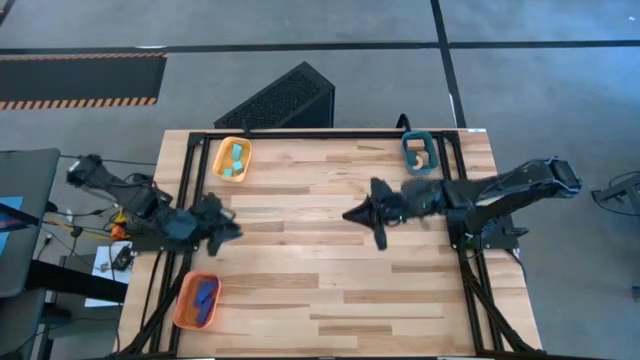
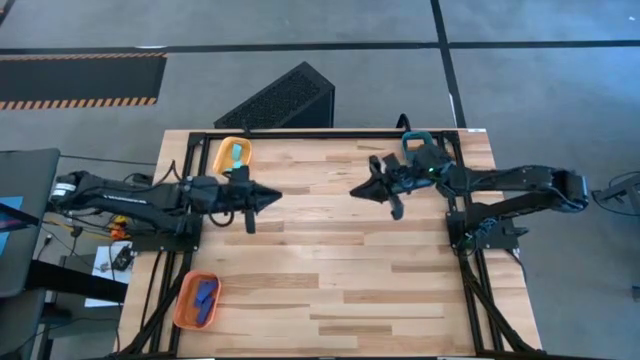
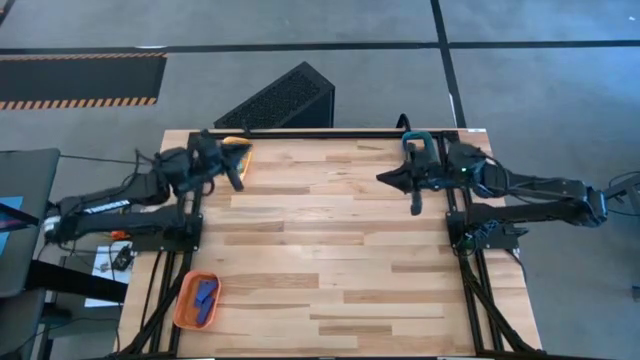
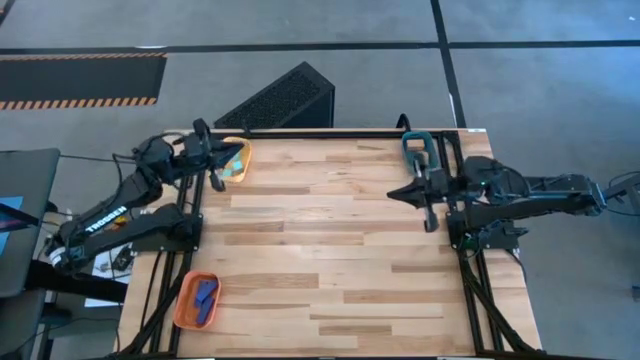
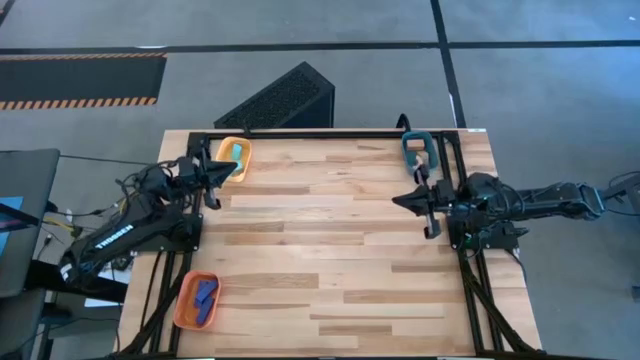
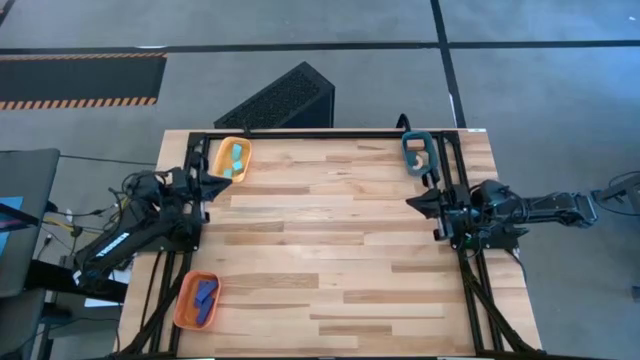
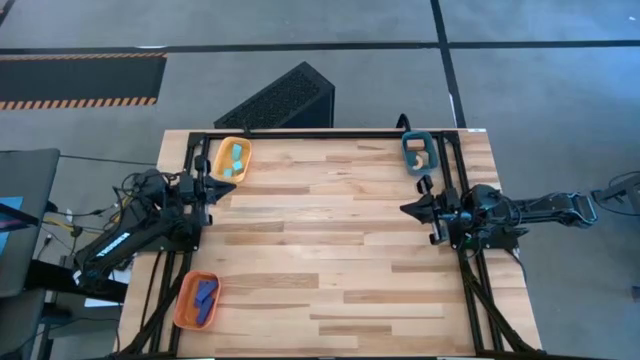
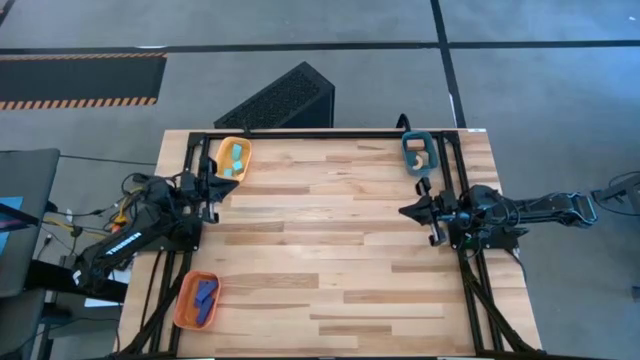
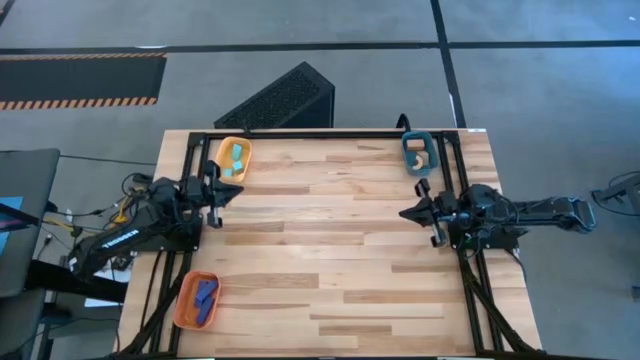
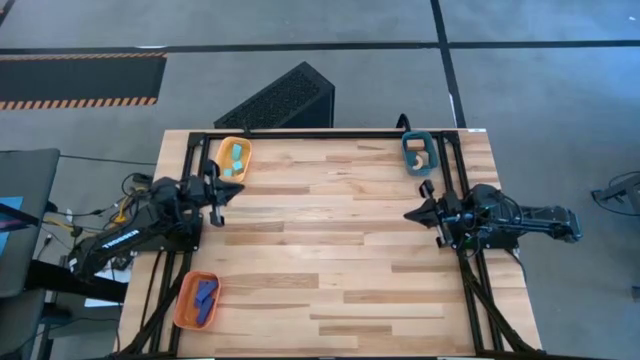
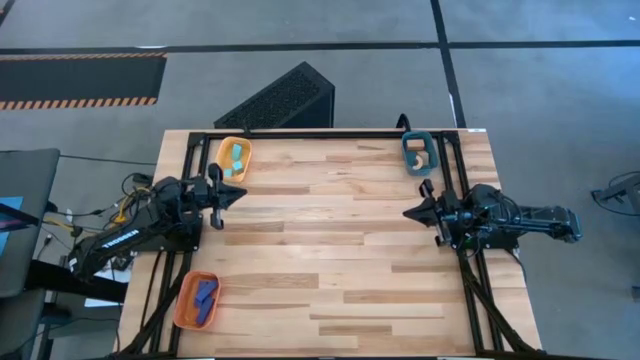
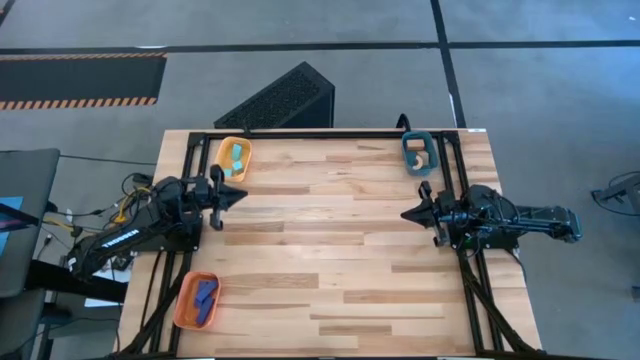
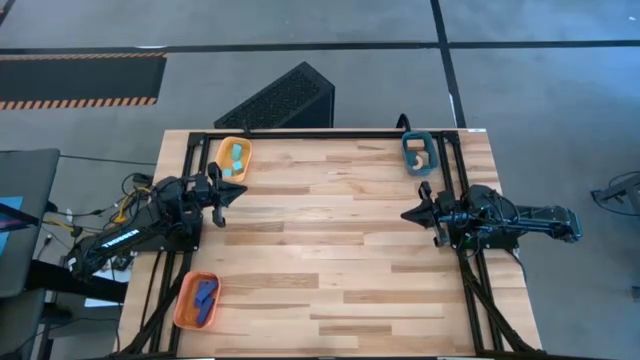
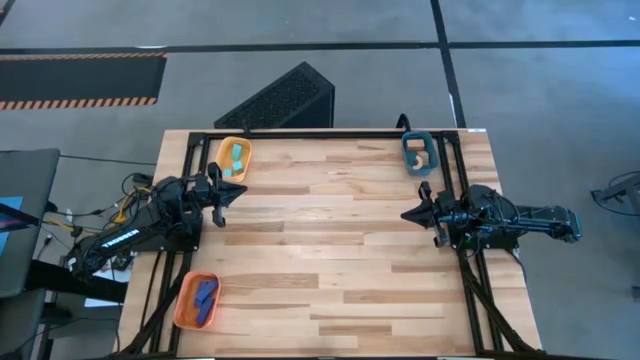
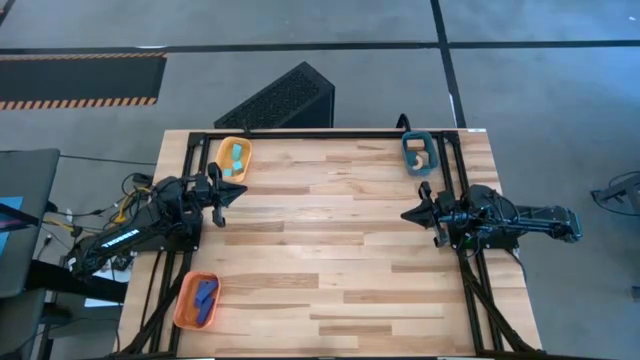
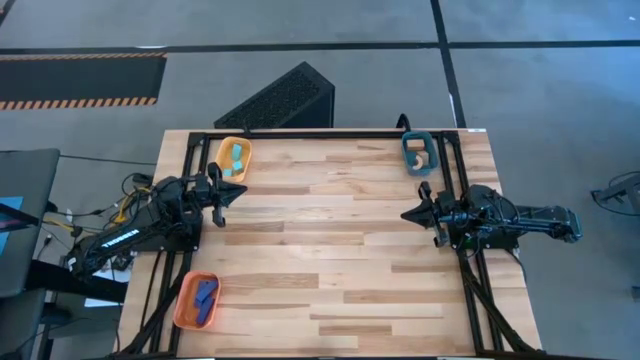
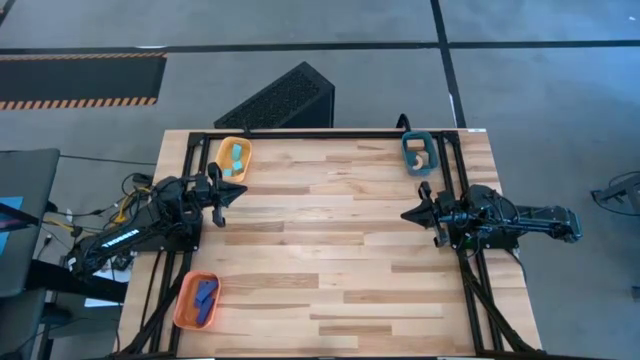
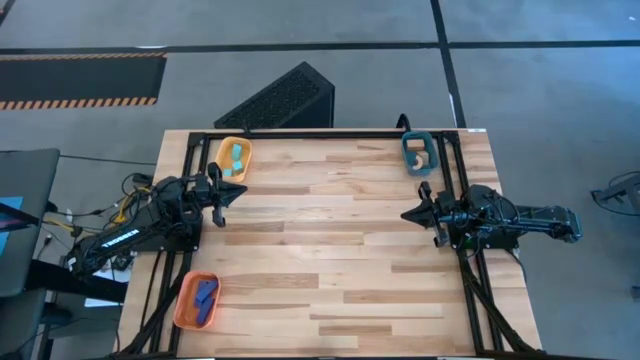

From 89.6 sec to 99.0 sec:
Task: Sort & place blocks by color
Return to Home Position

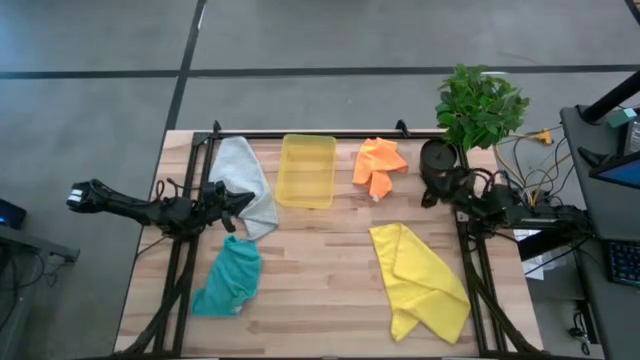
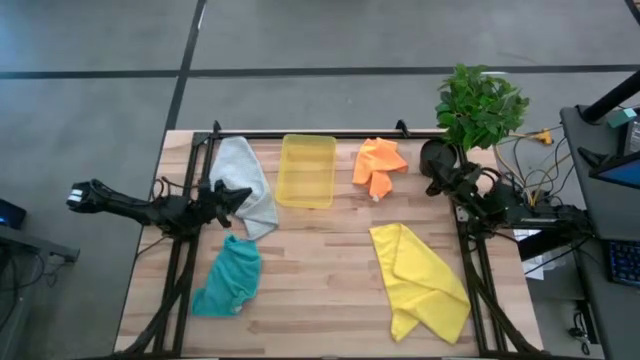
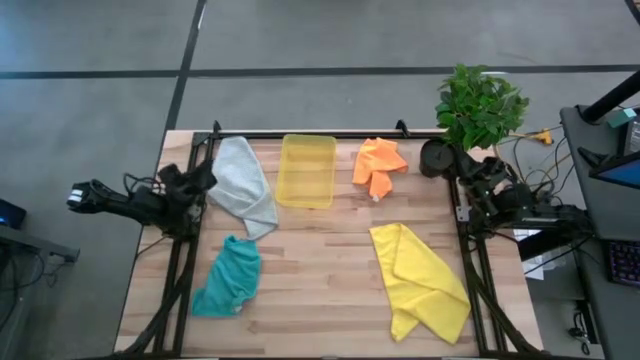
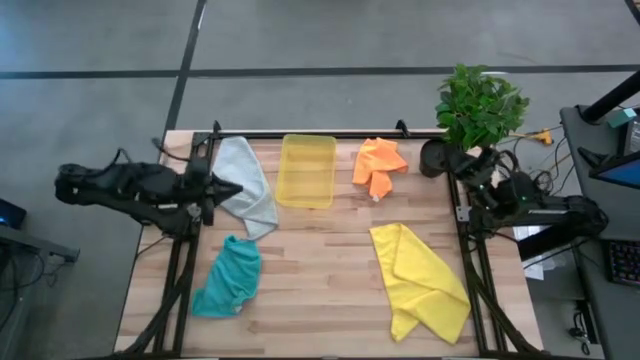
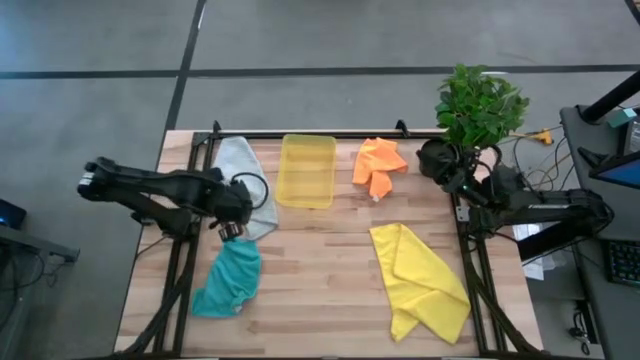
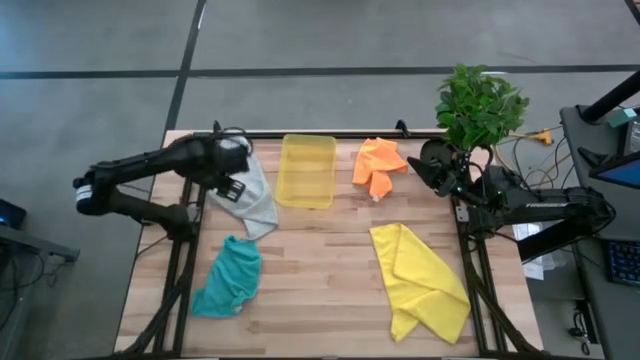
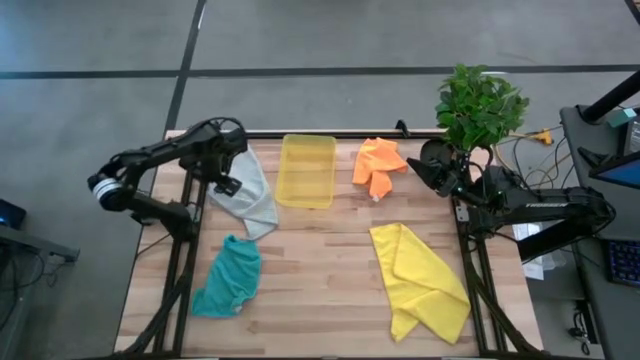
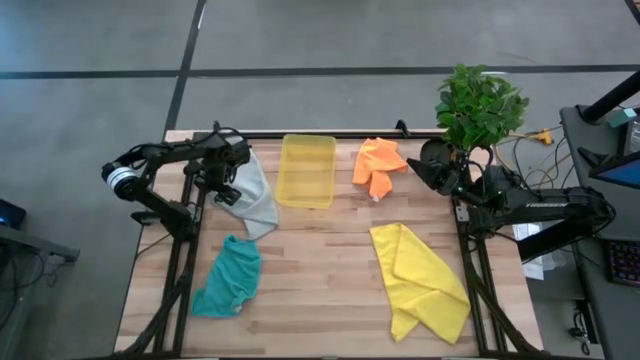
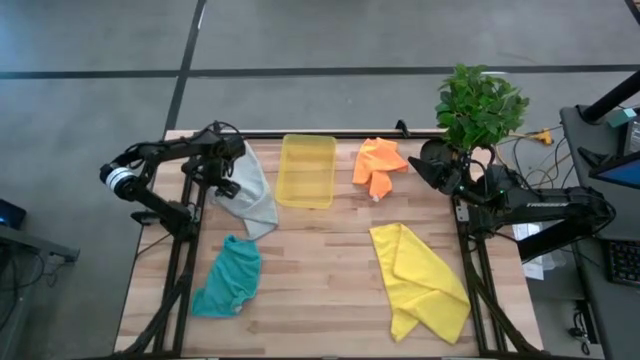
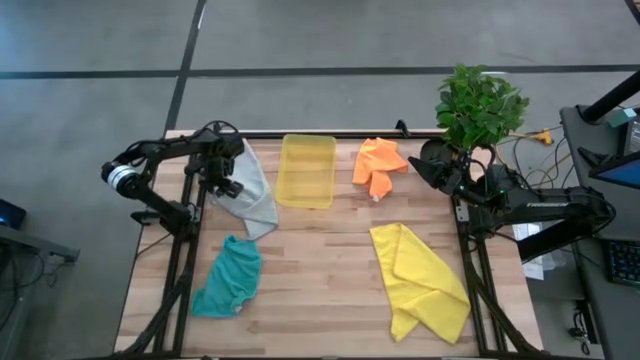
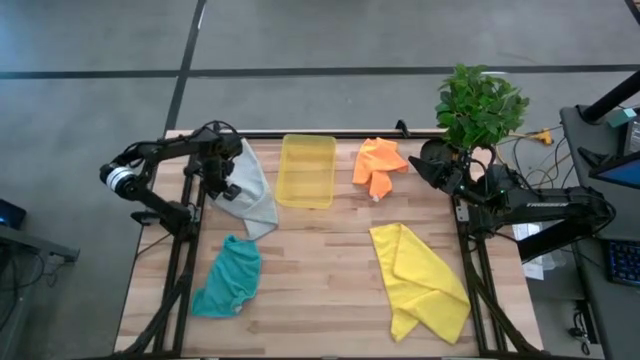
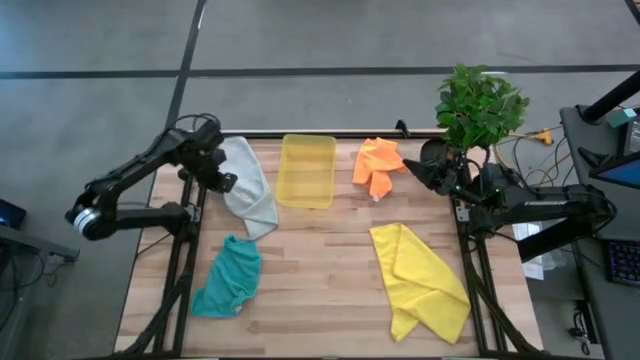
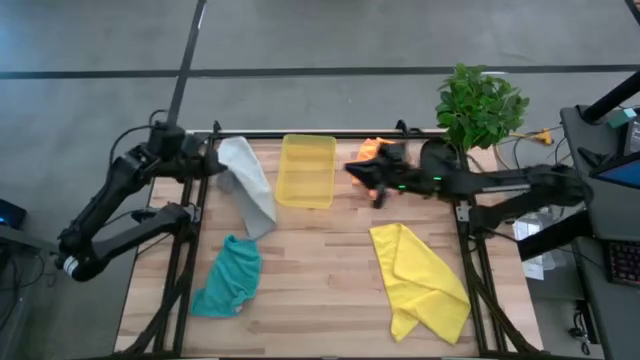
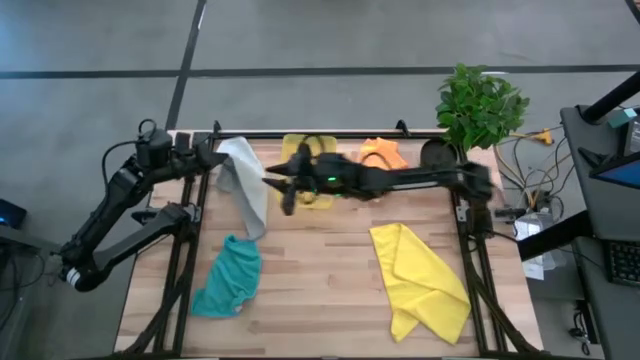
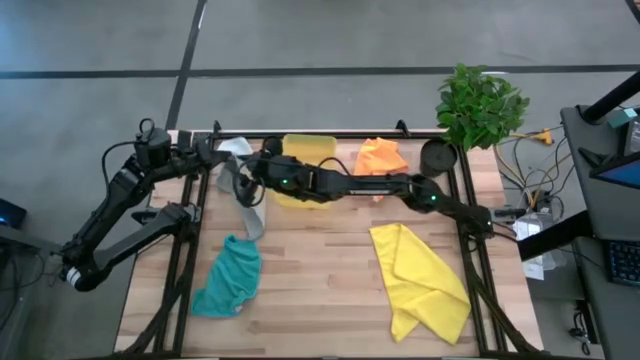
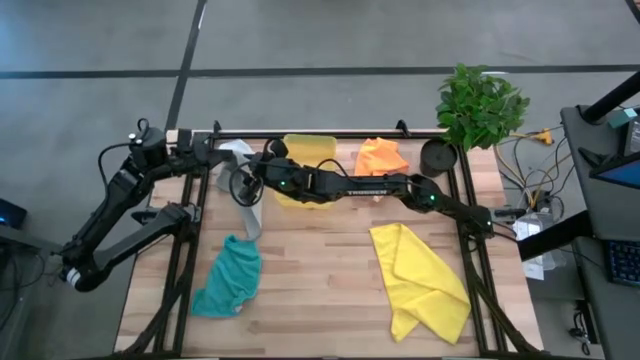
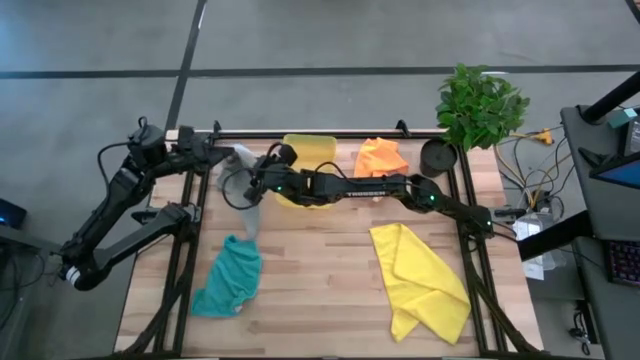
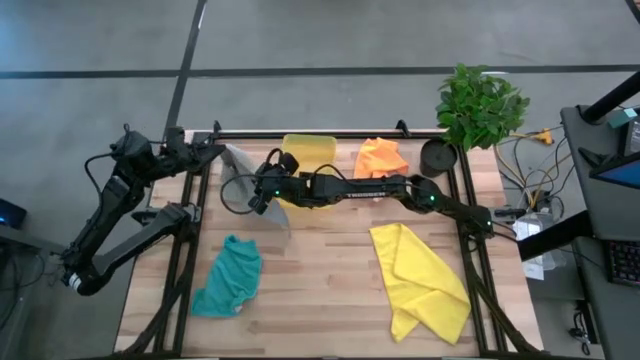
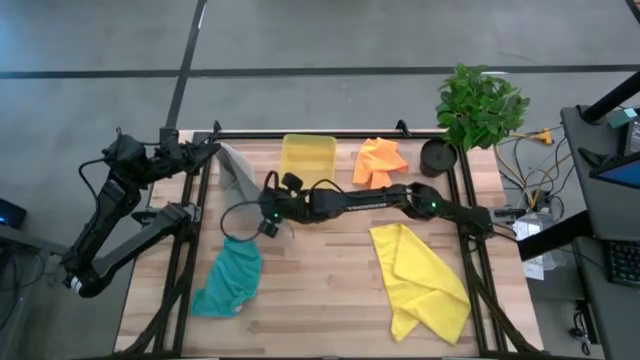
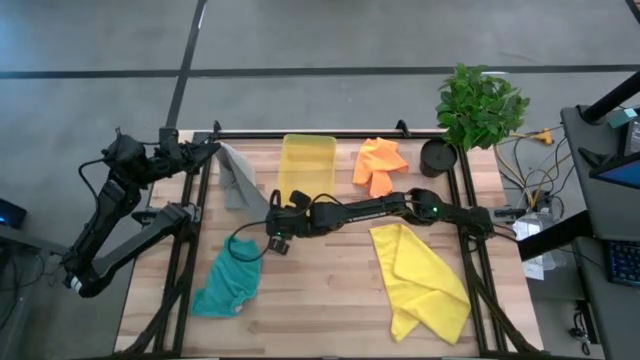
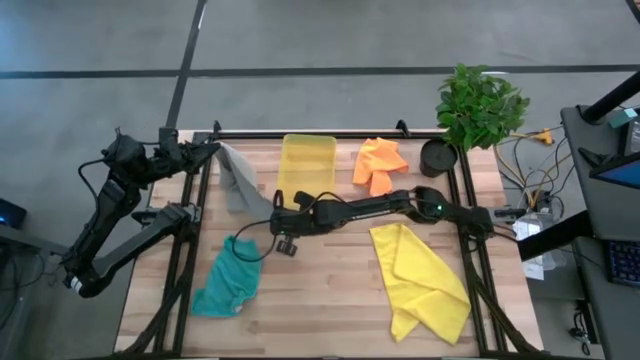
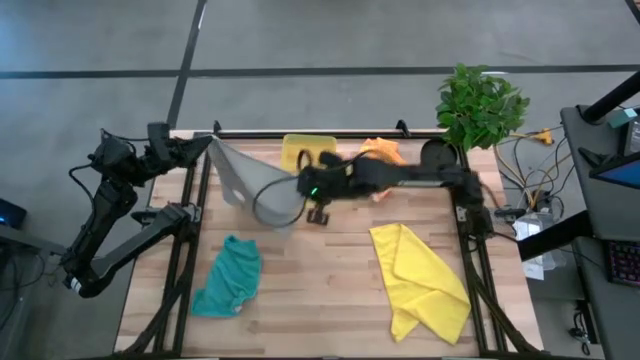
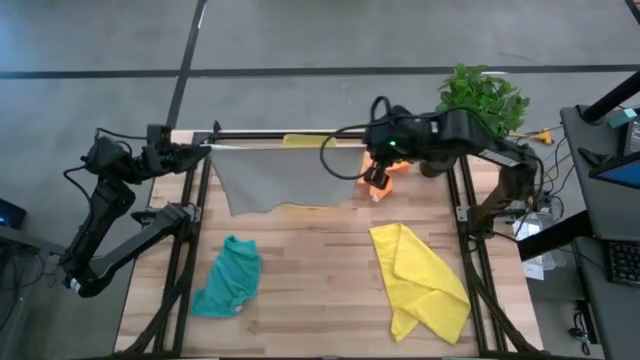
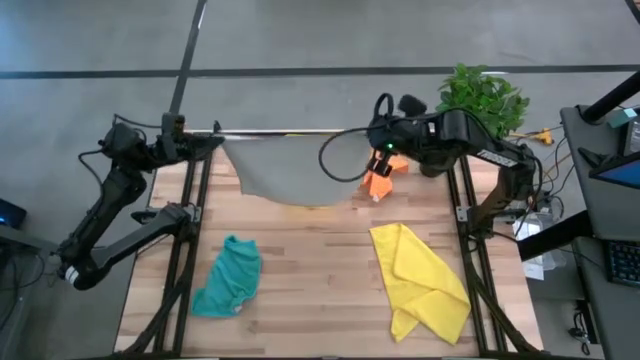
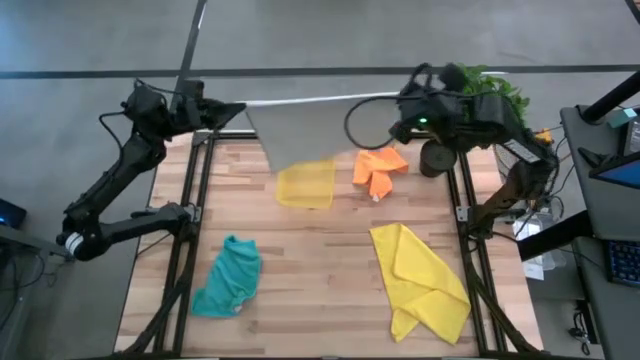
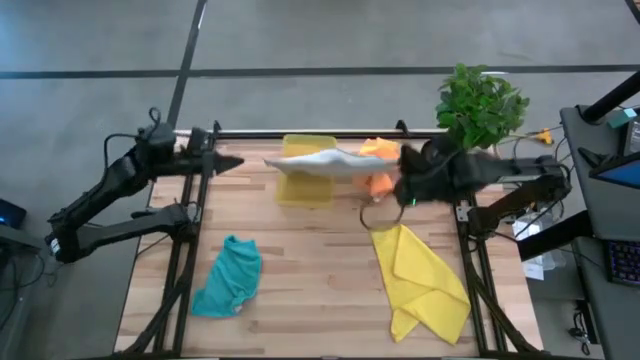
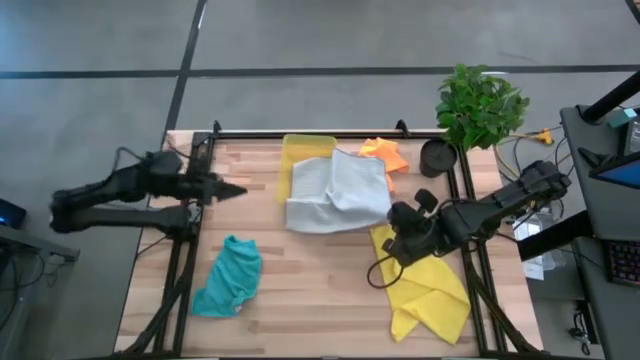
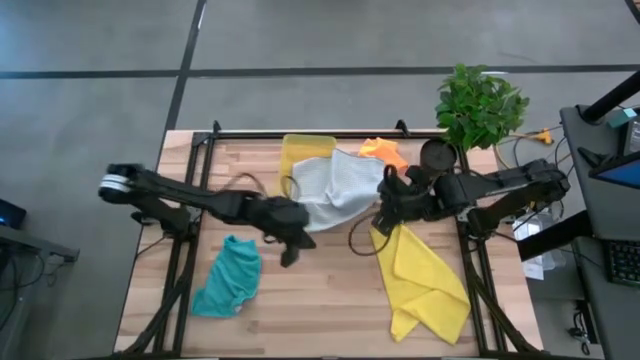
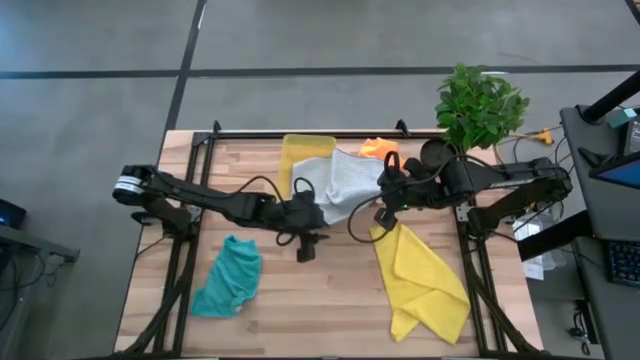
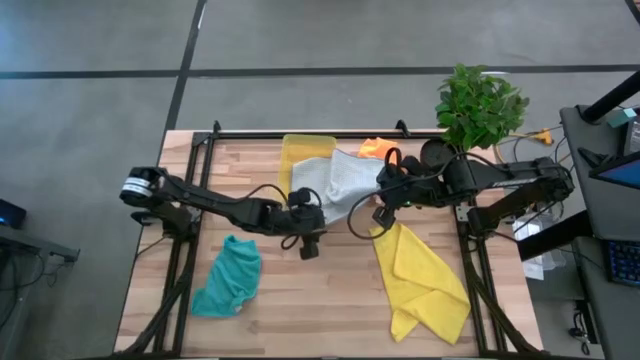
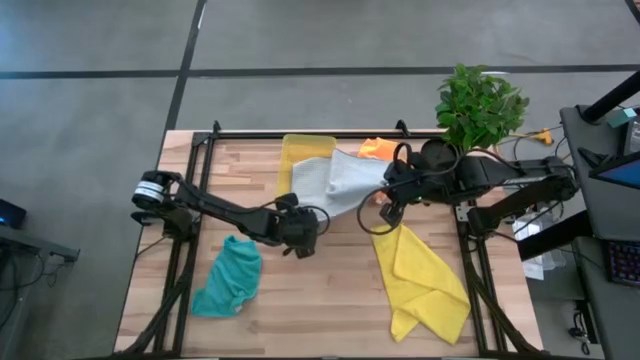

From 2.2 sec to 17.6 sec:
Task: Fold microfiber towels
Fold the gray microfiber cloth
